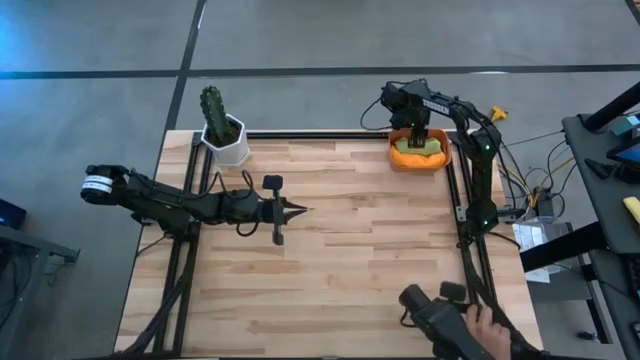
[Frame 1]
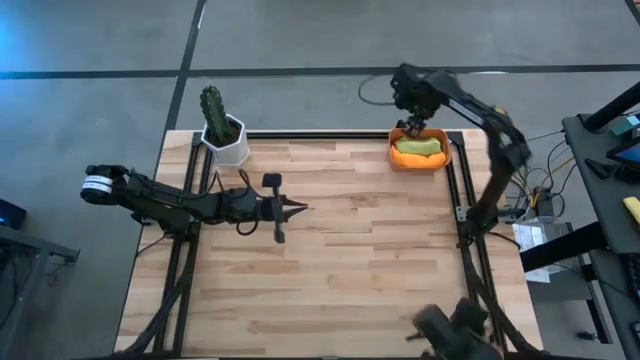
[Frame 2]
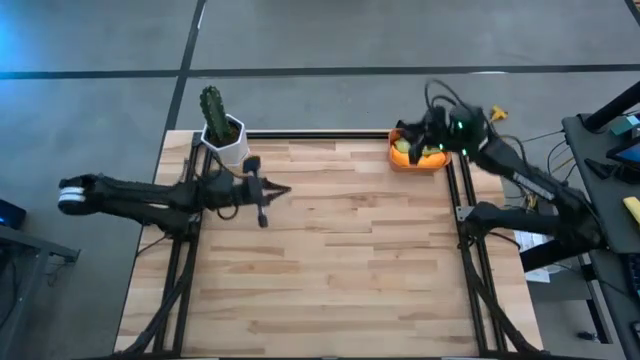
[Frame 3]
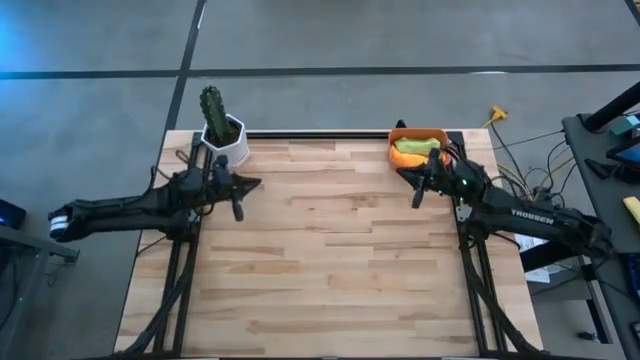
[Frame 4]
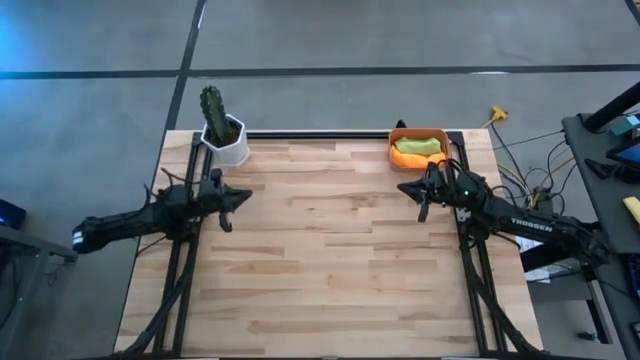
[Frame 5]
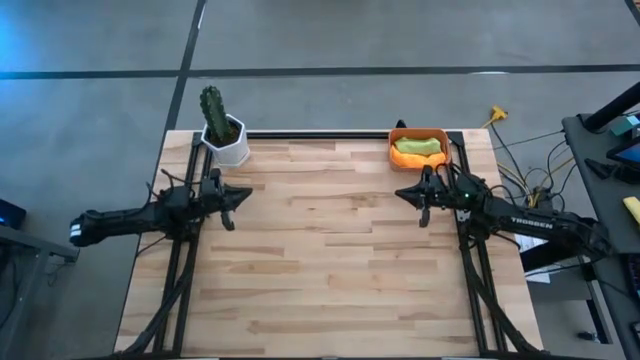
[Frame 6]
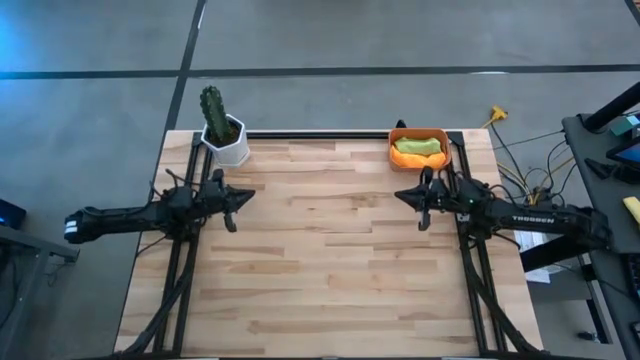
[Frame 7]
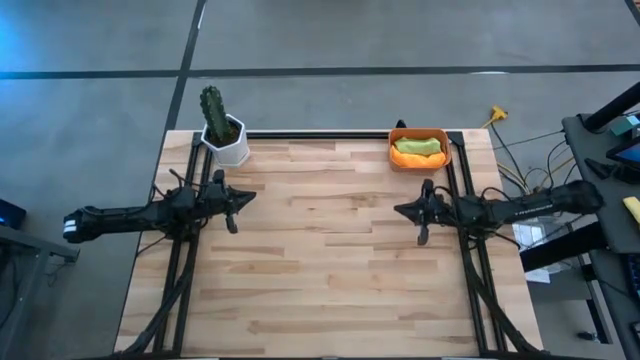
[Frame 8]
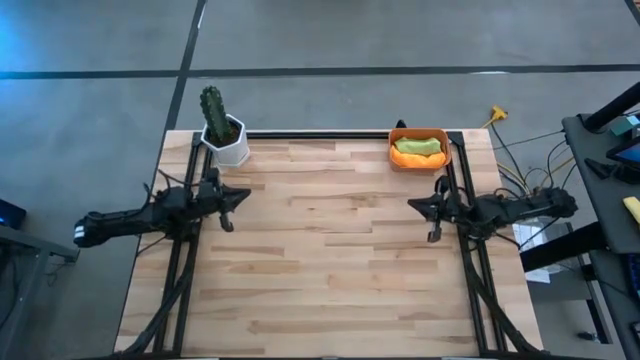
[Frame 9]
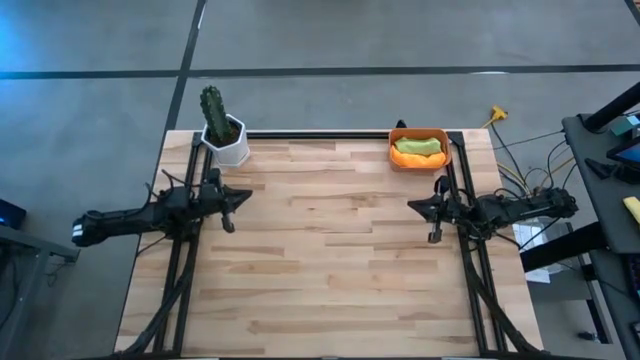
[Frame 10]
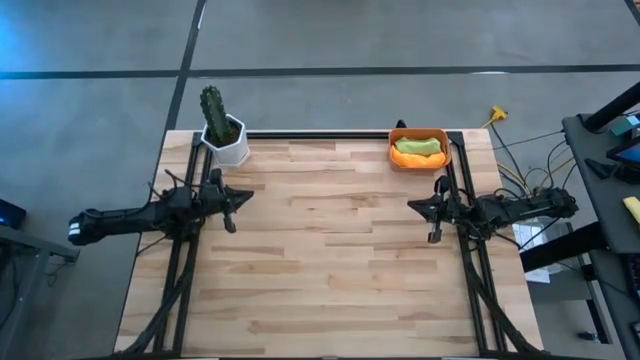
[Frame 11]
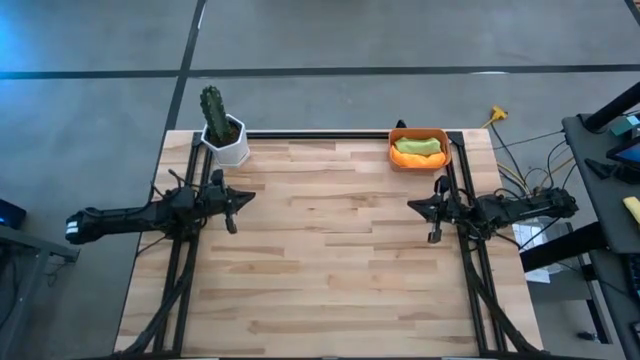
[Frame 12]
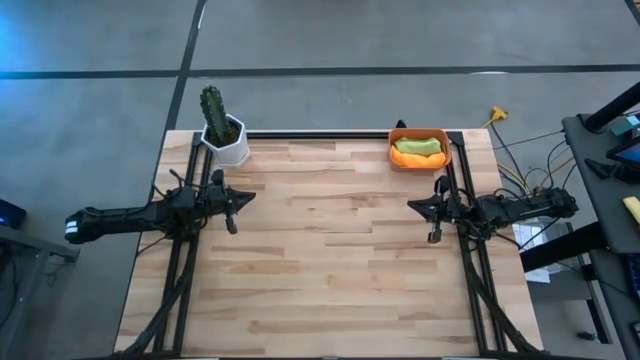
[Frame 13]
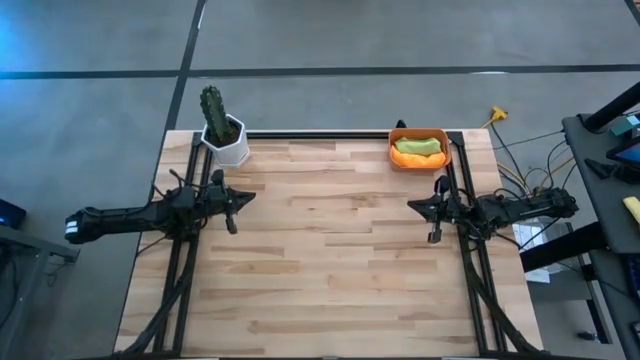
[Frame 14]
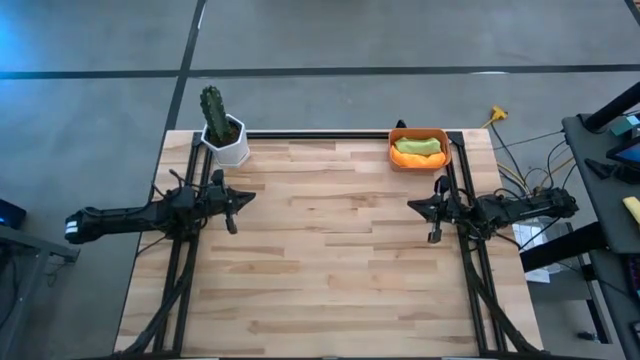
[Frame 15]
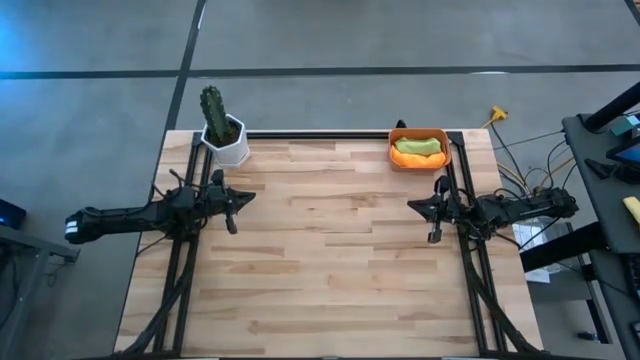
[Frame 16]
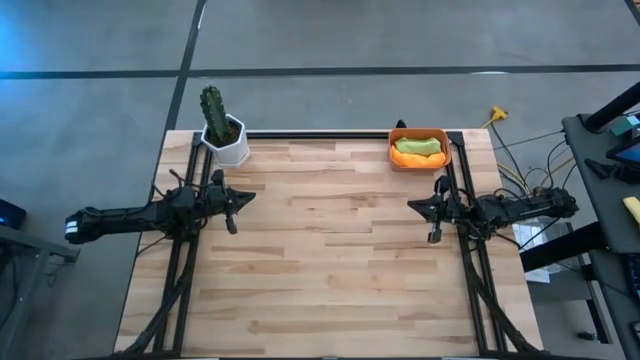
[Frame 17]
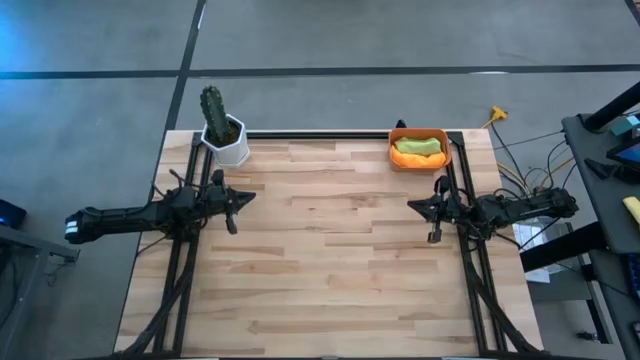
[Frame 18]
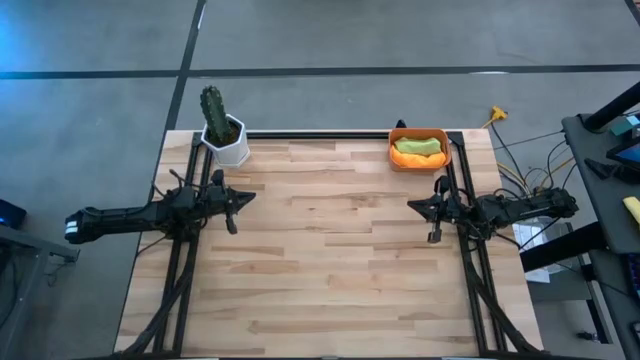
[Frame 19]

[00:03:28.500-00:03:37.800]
Task: Roll microfiber towels into tight, uniform cylinder then place into a basket
Return to Home Position

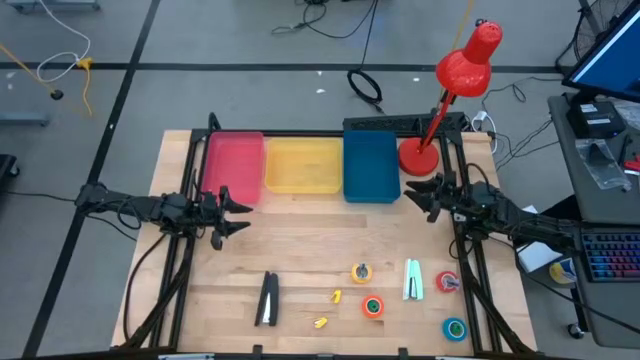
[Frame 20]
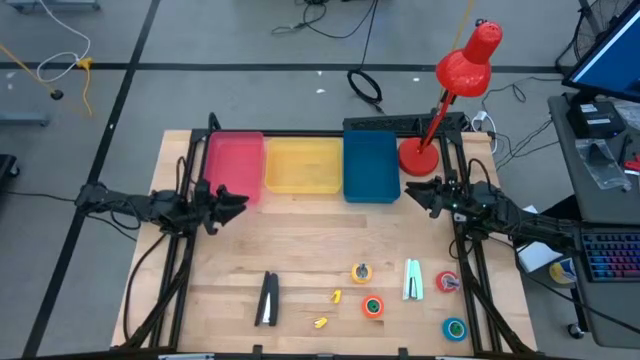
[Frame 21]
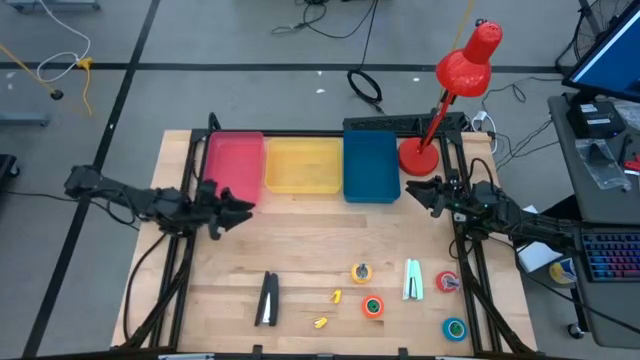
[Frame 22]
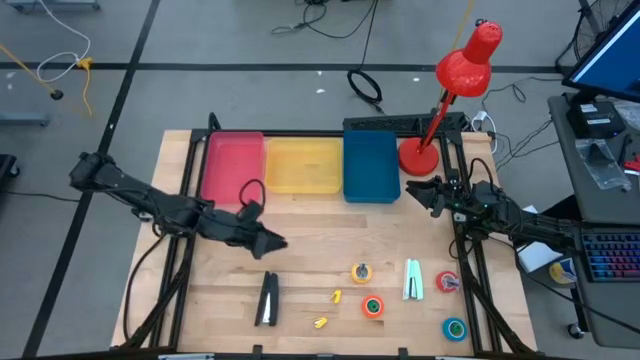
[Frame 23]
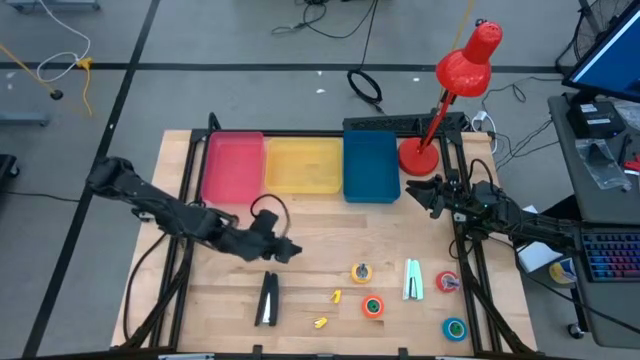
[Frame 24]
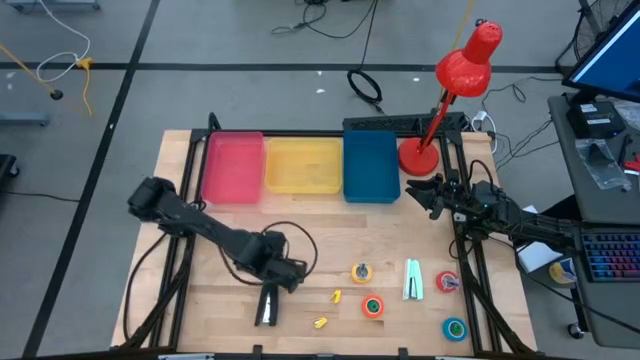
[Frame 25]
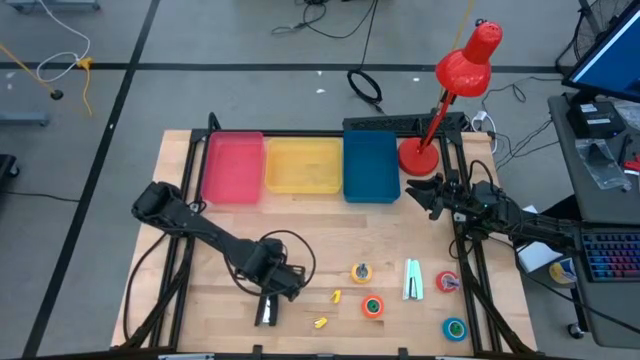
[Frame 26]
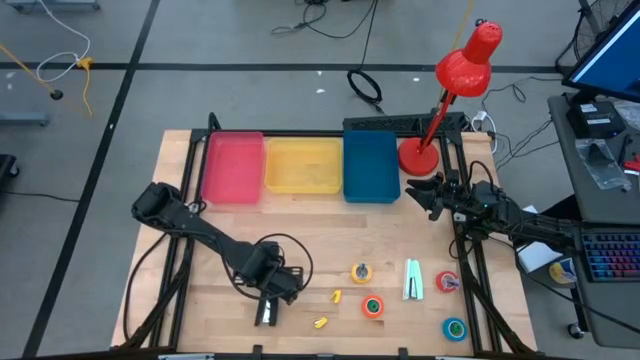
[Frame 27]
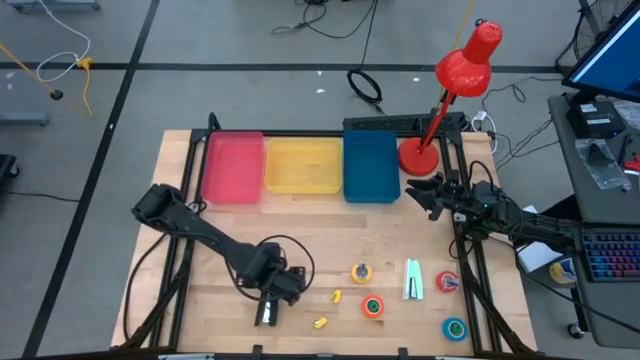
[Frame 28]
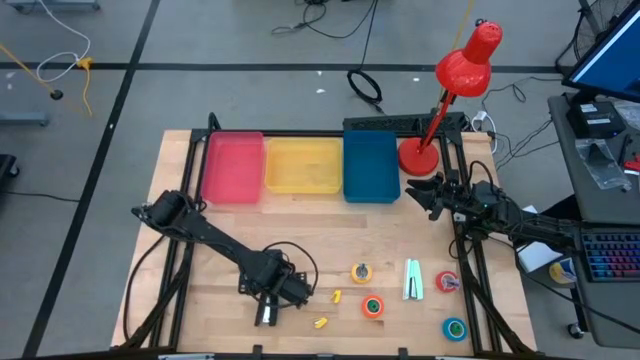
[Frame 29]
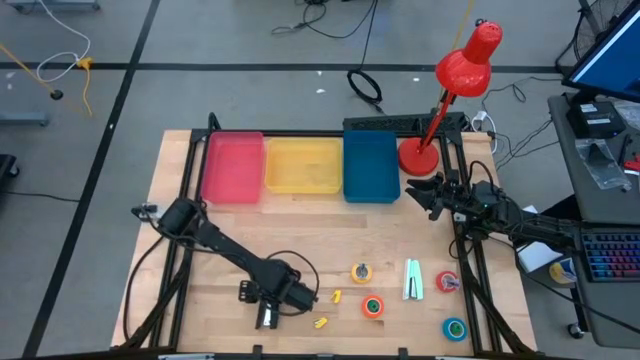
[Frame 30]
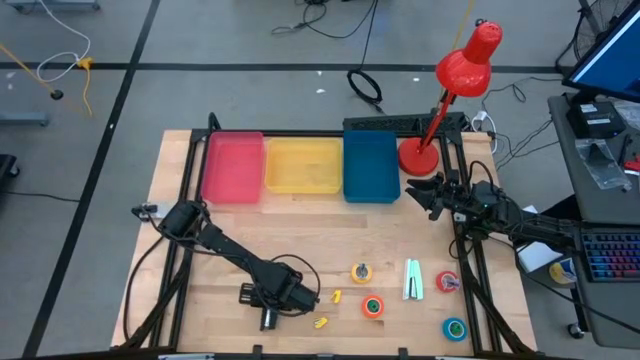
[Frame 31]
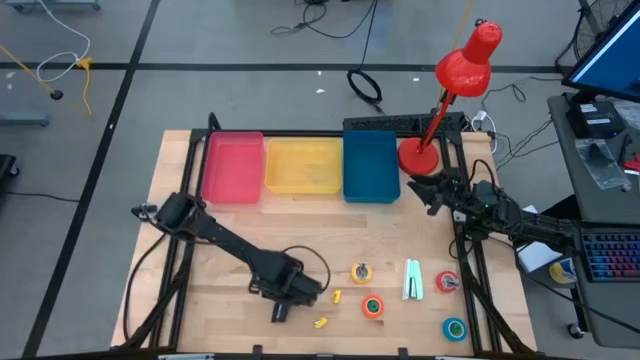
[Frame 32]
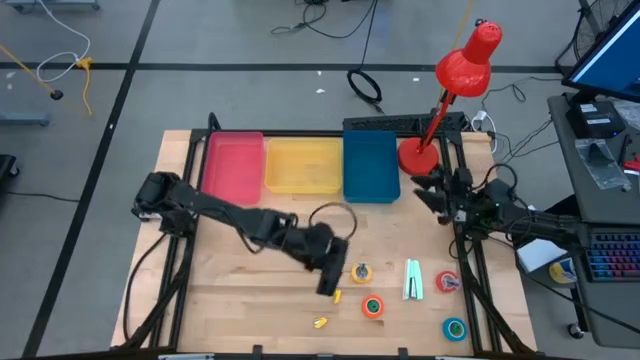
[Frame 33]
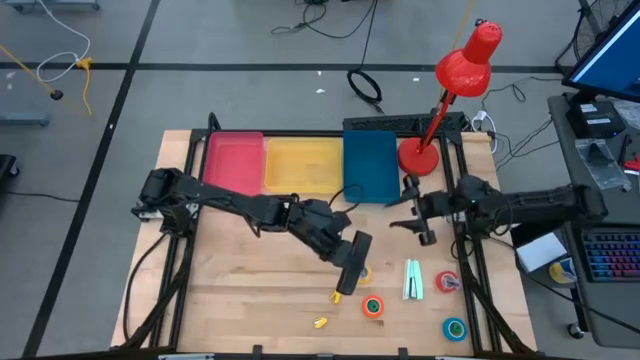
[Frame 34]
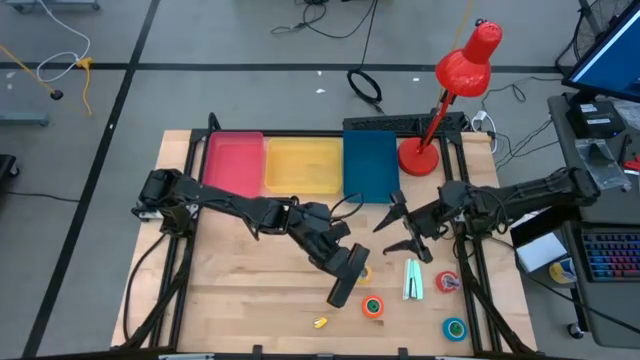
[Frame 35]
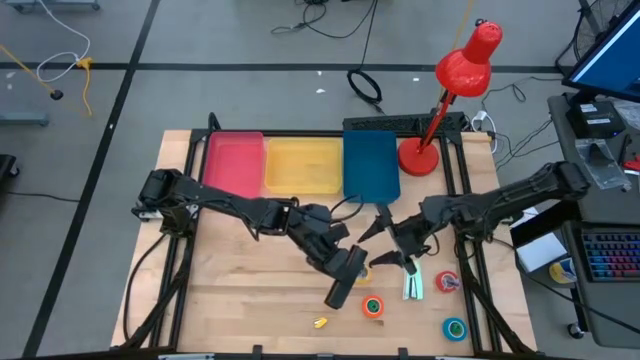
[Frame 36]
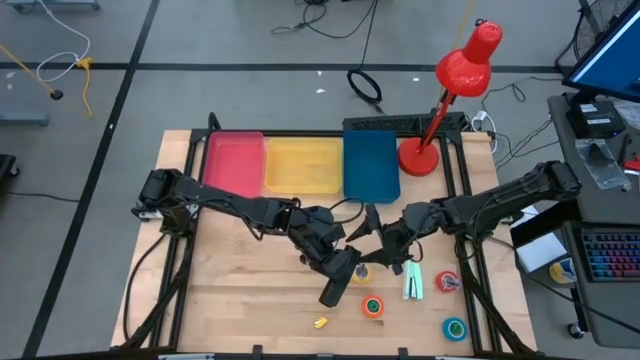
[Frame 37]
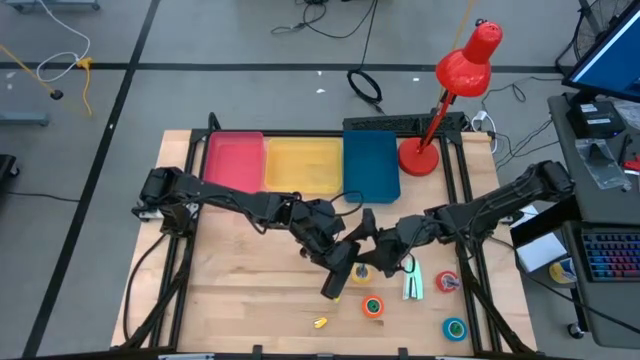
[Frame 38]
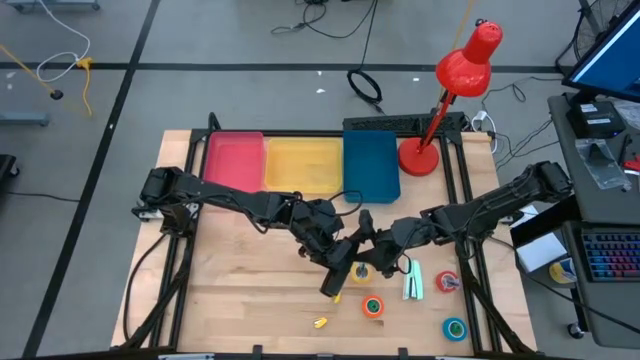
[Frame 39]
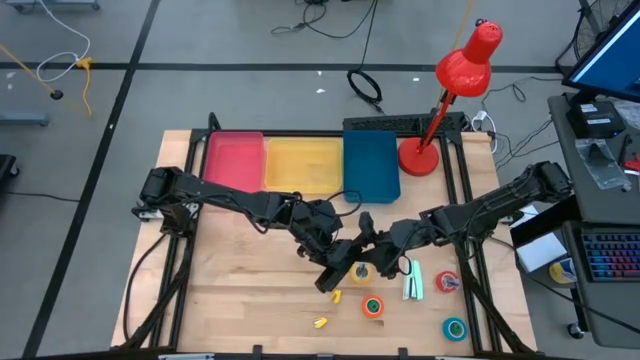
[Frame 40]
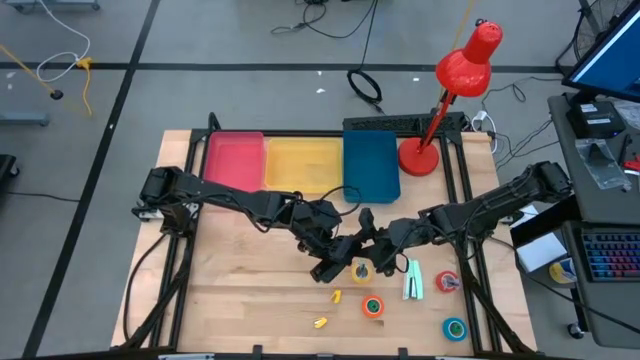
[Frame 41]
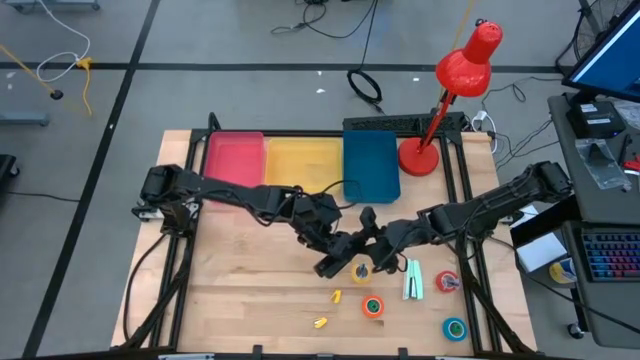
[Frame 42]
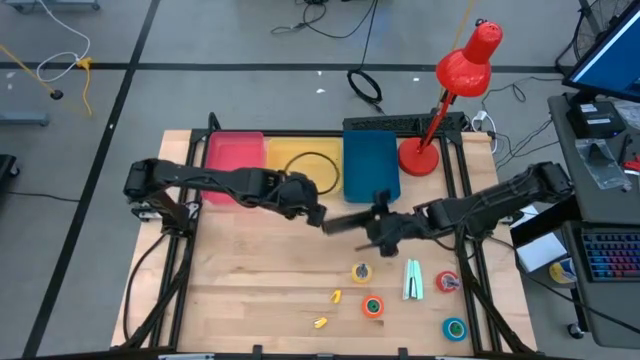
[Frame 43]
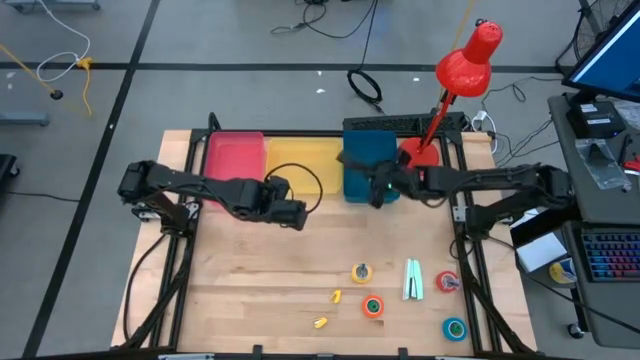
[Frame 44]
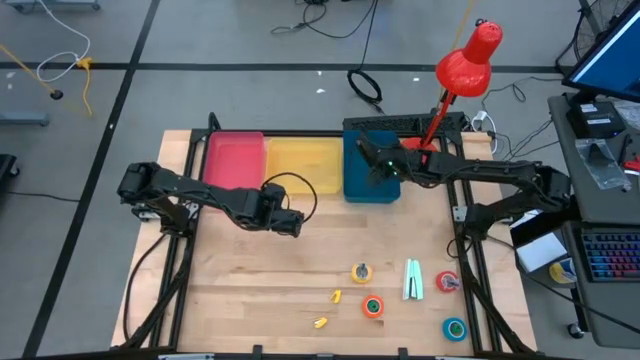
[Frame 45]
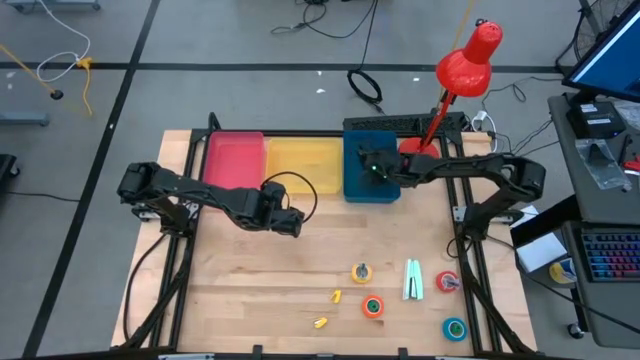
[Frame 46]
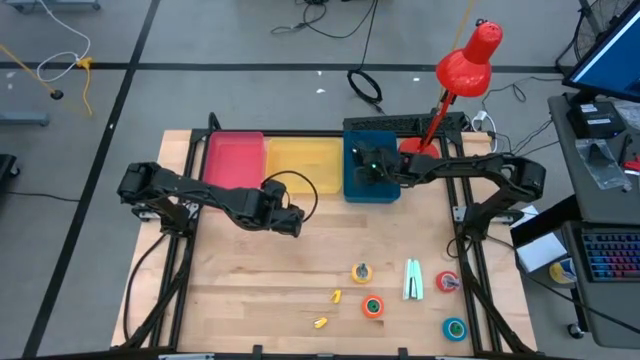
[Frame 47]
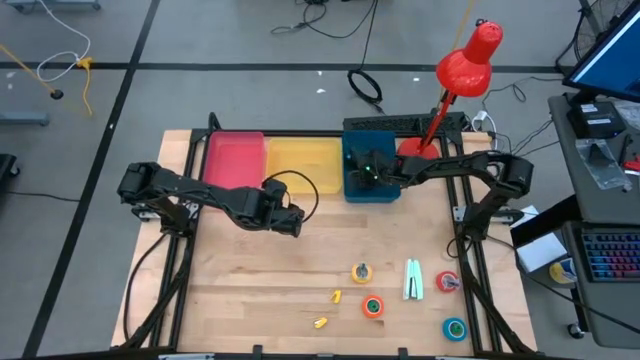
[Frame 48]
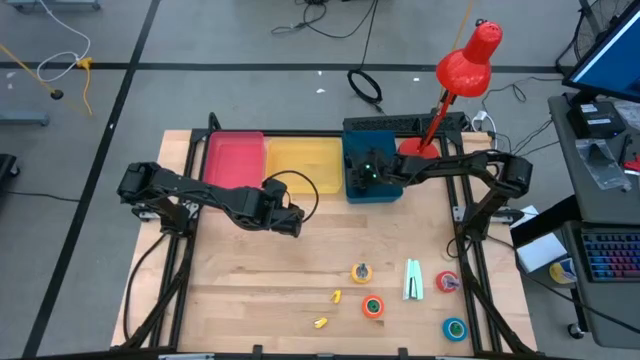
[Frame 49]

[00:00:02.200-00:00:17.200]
Task: Pick and place Stapler, Stapler remover, tape
Put the black large stapler into the blue bin
